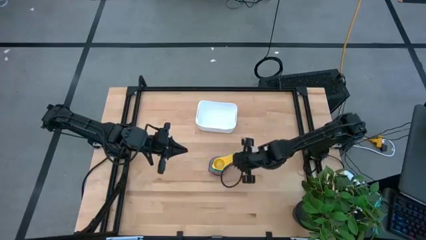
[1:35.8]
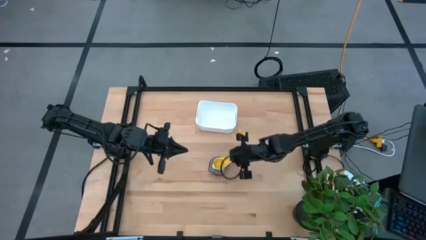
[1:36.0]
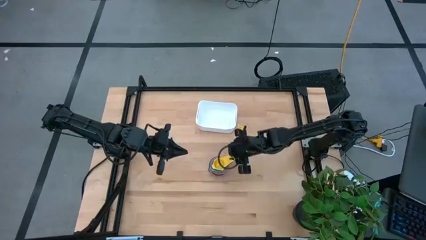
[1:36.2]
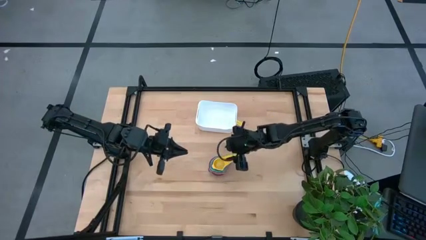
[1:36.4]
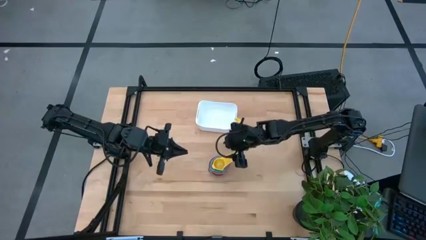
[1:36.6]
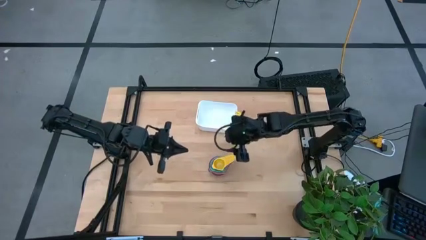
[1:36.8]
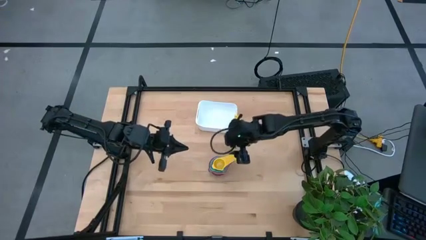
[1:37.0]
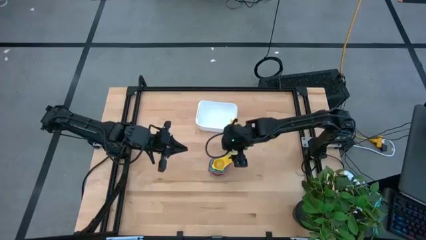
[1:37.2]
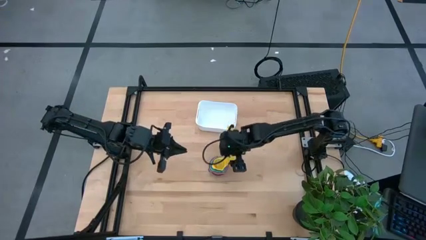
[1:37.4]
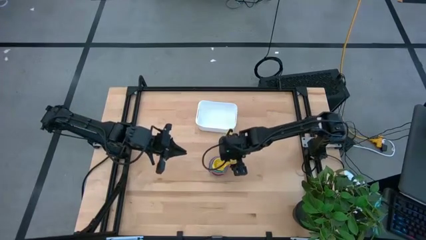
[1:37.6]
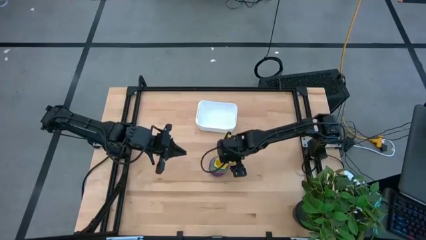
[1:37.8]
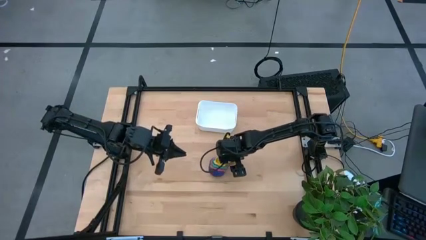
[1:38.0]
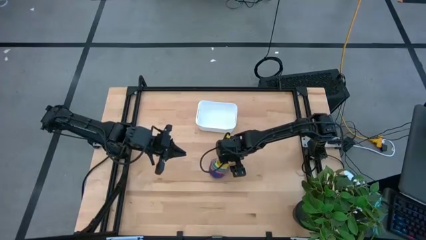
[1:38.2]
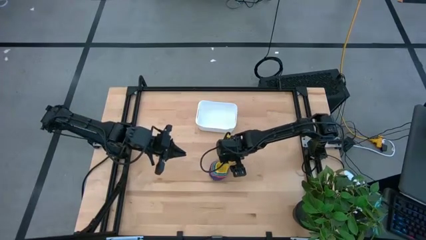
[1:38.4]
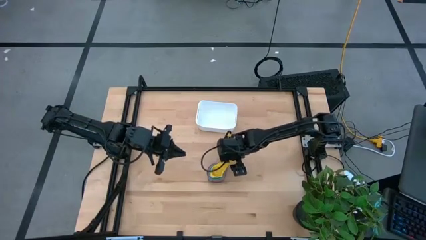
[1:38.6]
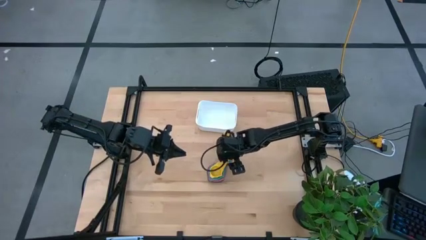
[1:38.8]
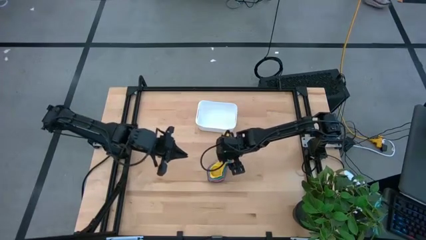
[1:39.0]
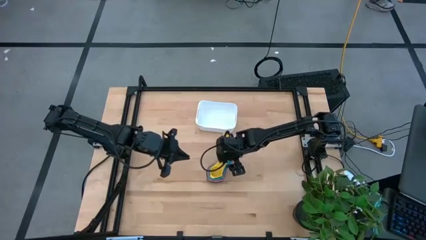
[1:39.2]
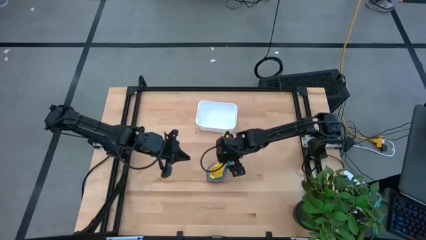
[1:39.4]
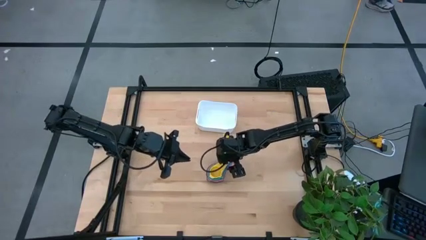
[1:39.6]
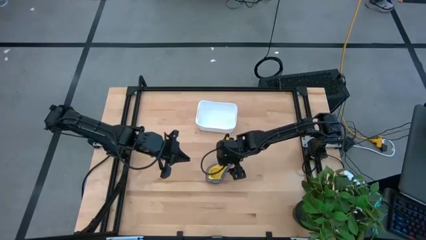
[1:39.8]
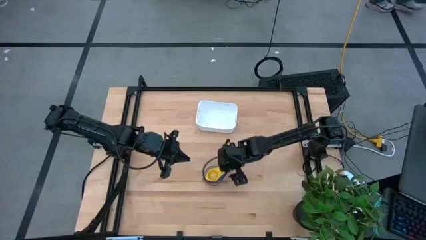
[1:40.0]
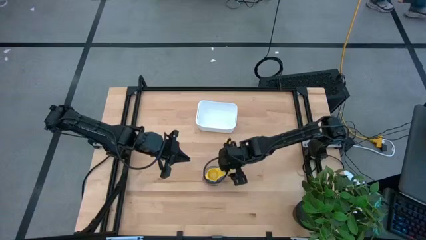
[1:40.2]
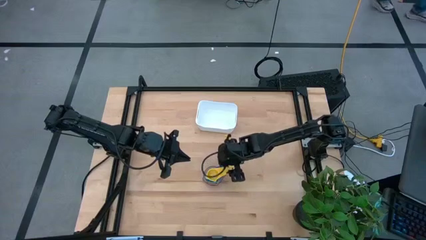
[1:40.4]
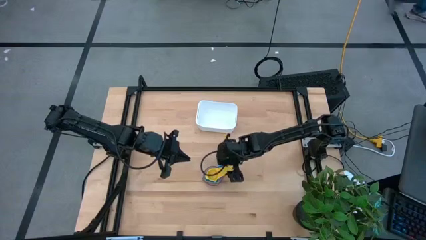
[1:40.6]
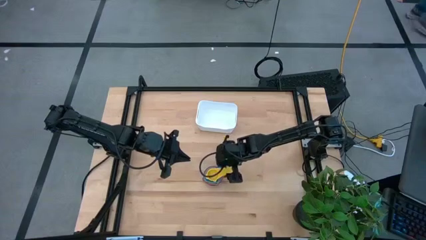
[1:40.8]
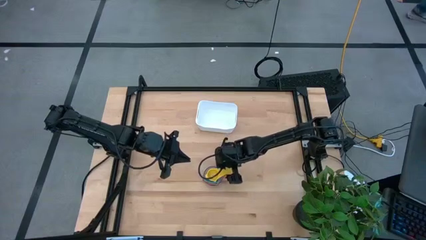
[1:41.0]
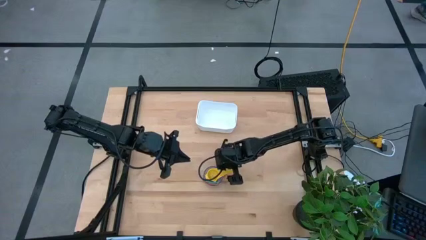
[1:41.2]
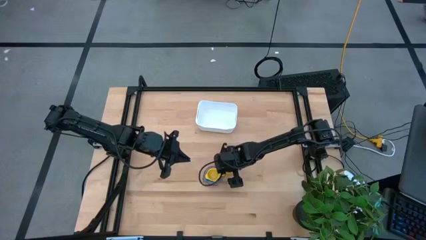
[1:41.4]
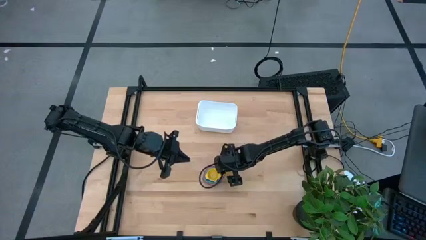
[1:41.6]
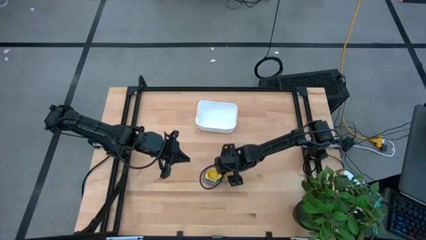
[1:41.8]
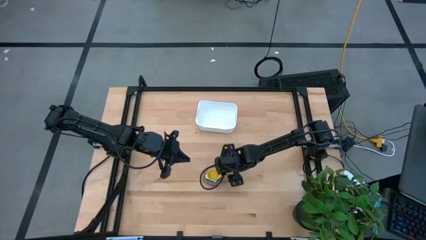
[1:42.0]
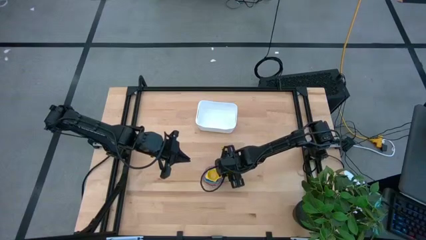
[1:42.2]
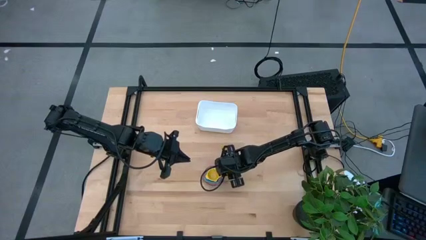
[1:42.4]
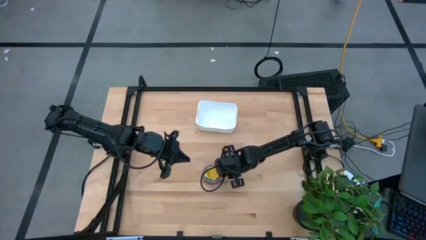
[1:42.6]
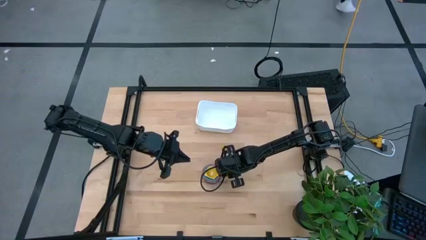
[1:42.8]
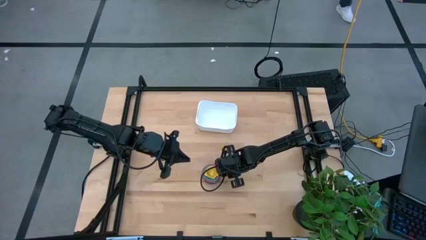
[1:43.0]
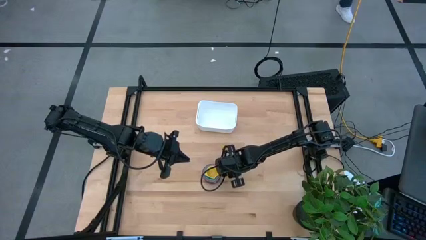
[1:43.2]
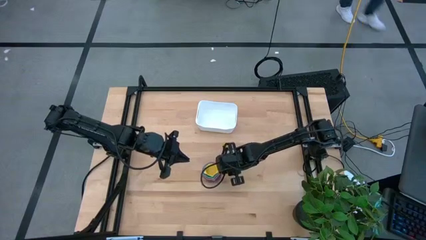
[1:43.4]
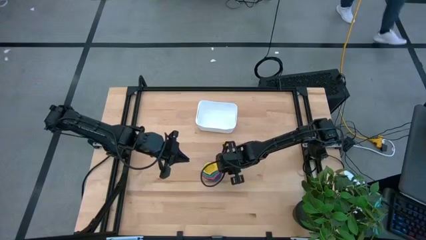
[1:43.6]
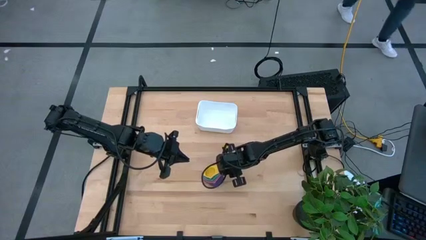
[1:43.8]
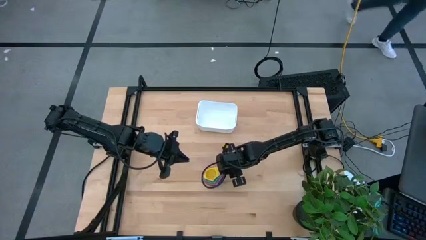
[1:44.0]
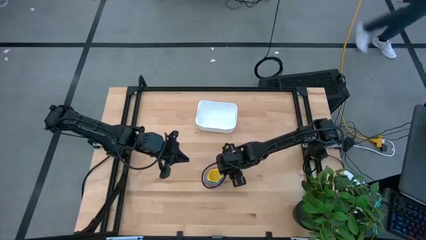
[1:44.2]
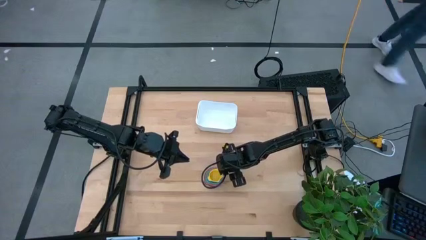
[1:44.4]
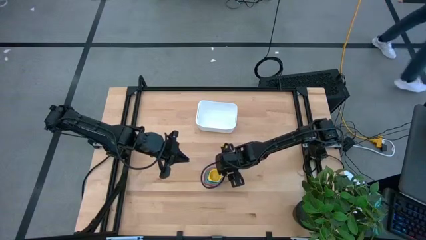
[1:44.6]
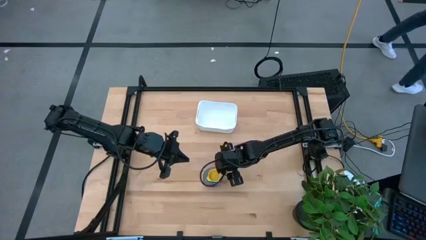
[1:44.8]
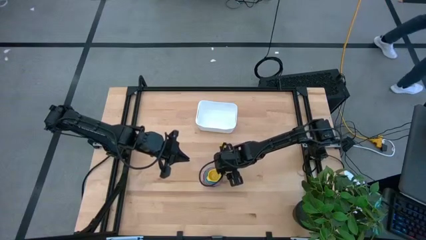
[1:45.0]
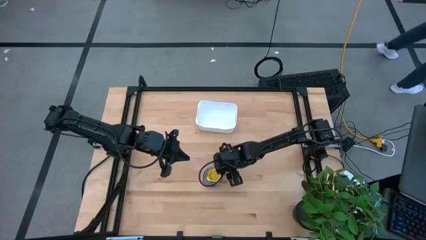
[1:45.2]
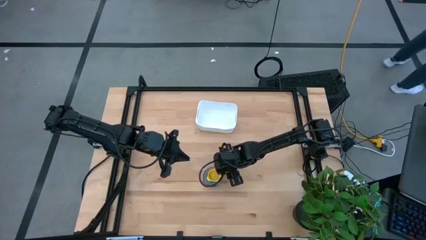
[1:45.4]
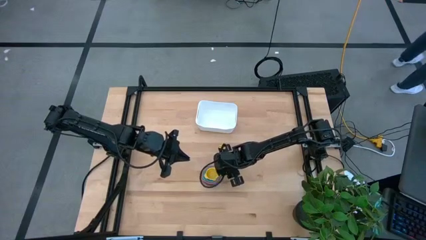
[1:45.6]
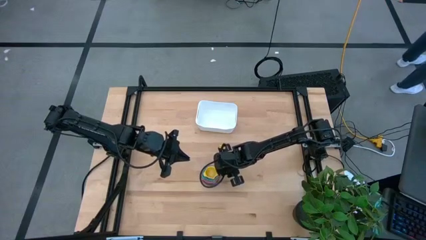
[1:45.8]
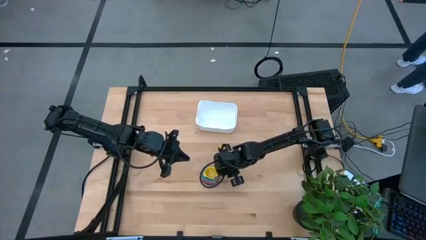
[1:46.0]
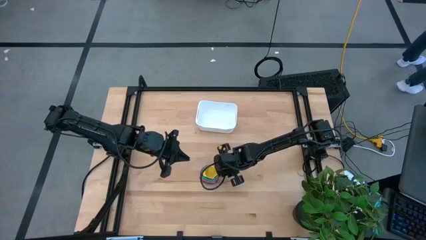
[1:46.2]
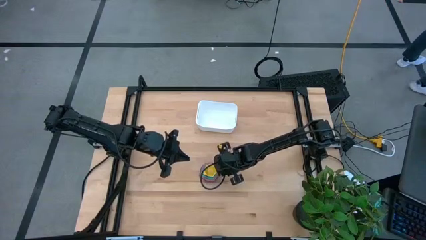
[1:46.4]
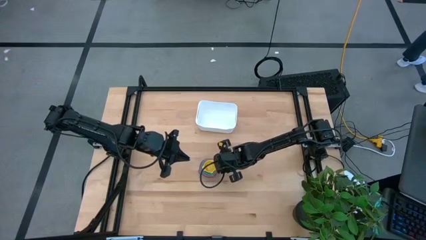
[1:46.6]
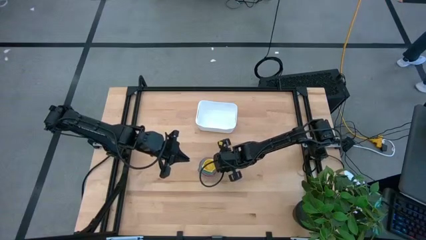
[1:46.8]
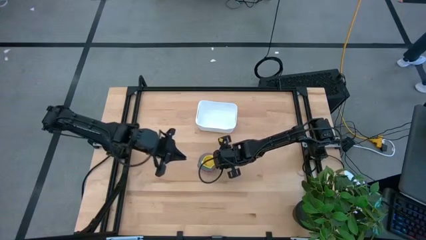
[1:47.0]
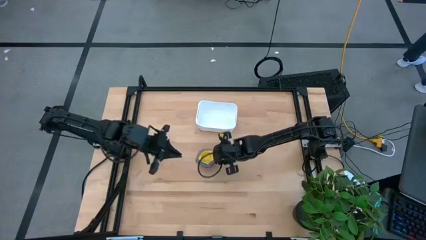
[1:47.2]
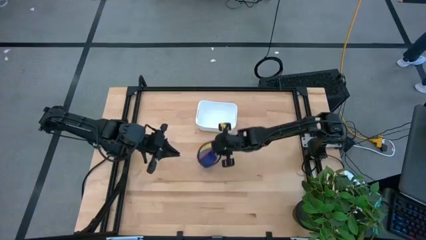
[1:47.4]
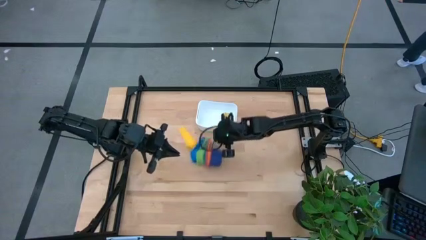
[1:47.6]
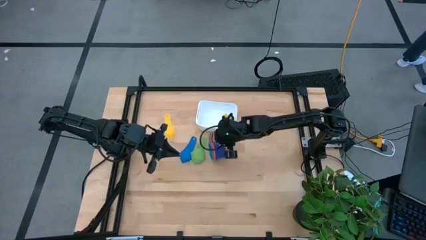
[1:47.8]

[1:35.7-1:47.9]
Task: Nest measuring cups in basket
Put the stack of measuring cups into the white bin

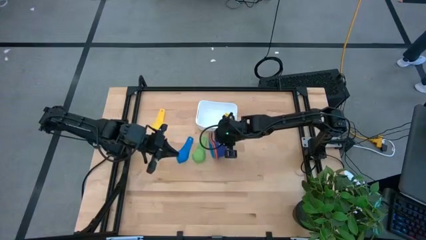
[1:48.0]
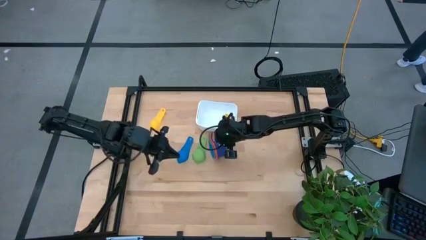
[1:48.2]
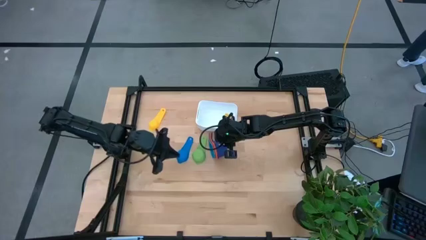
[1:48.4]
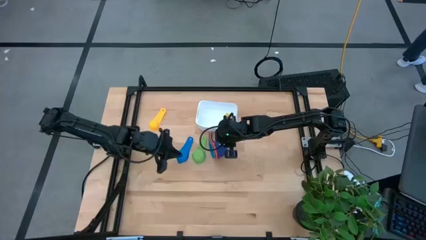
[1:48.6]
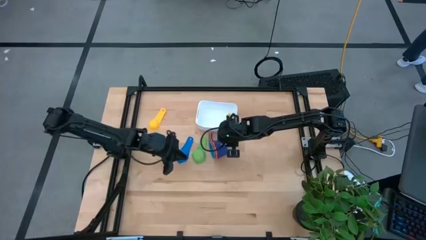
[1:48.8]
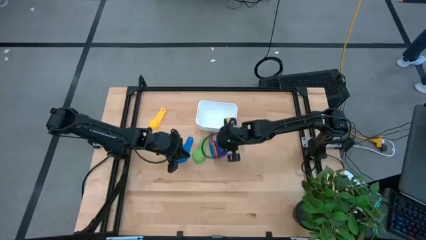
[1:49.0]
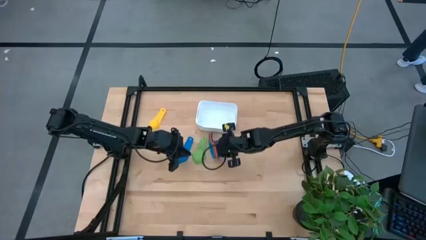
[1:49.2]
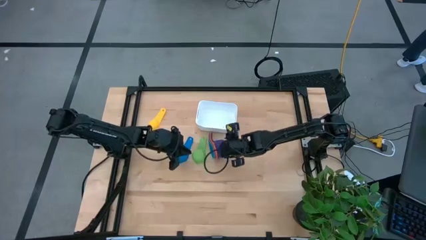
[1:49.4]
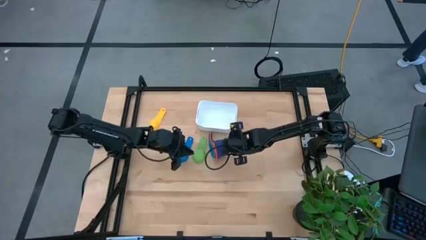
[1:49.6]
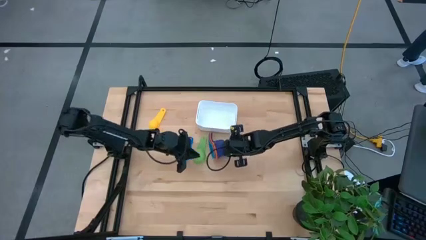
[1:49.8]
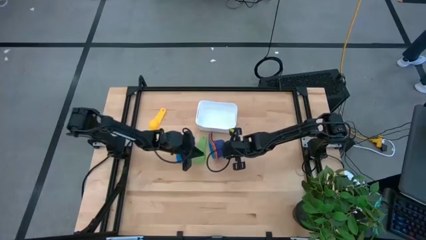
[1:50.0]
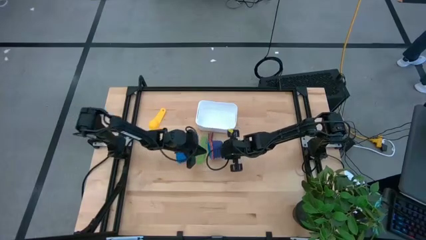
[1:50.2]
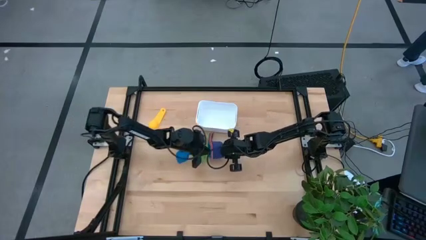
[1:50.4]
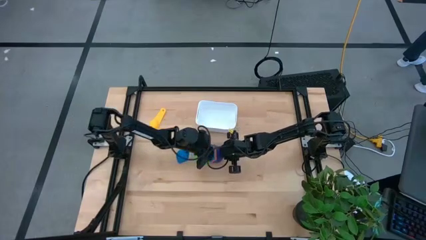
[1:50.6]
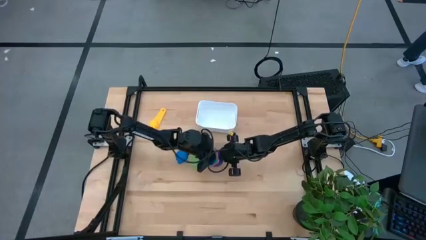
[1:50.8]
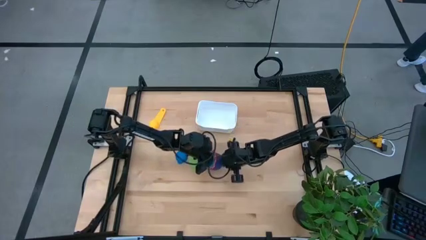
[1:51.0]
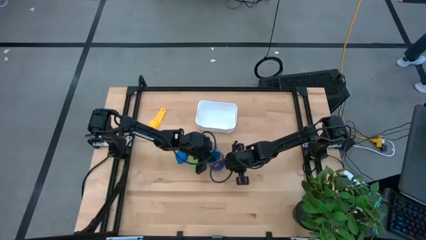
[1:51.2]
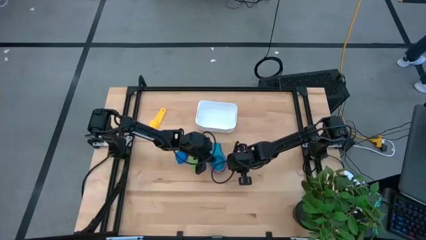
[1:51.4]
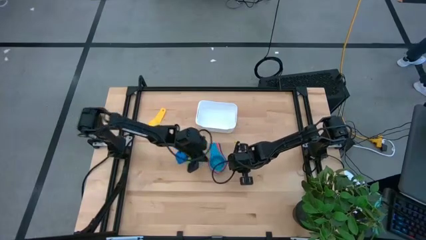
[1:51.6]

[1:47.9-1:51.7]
Adjust the measuring cups

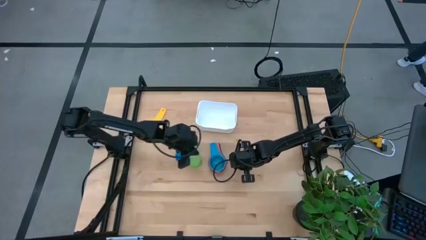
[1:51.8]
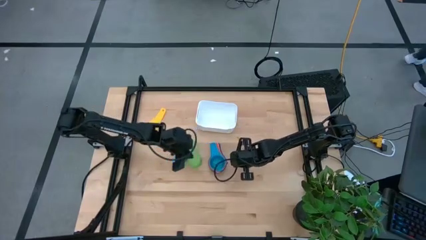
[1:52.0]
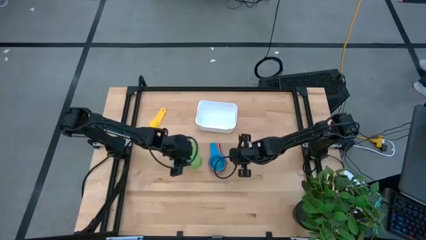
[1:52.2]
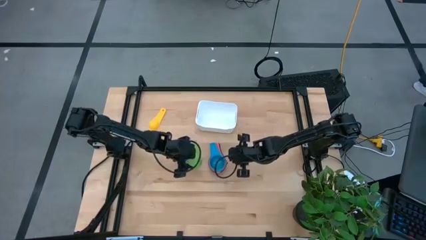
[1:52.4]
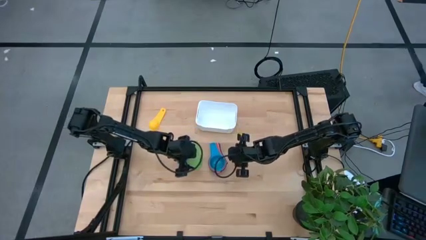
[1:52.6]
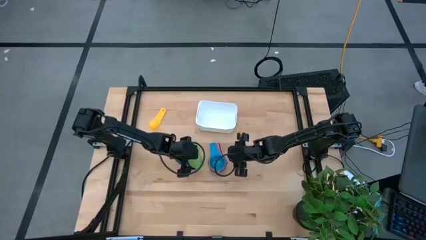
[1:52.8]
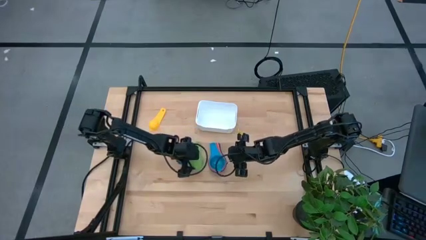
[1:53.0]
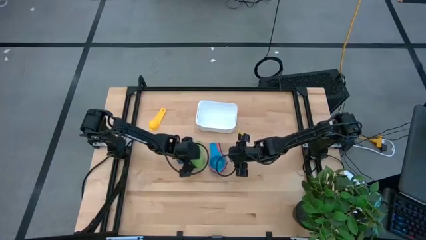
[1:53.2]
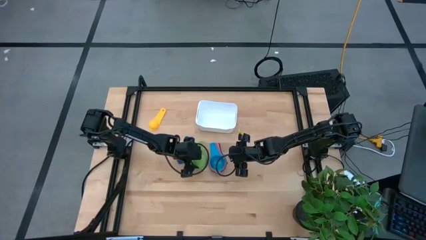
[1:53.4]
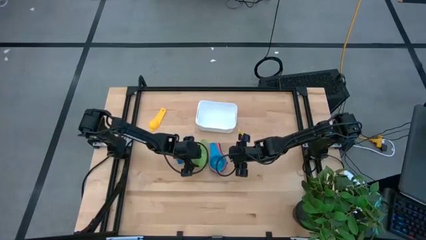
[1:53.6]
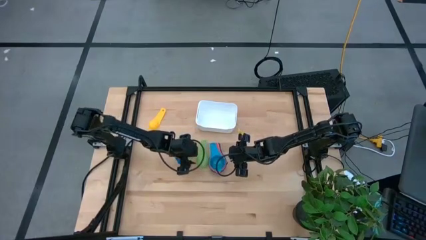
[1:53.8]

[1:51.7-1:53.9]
Stack the green measuring cup on top of the light blue measuring cup
